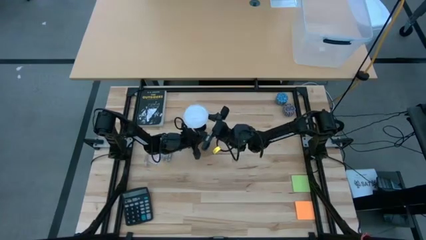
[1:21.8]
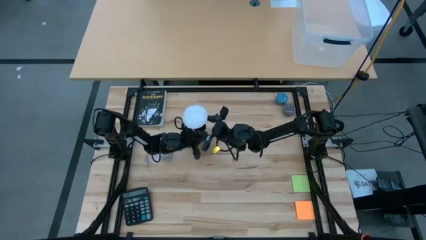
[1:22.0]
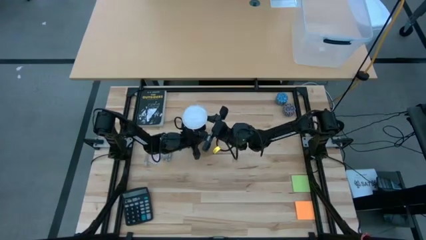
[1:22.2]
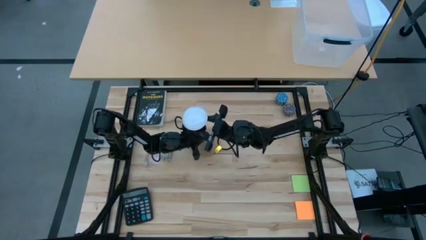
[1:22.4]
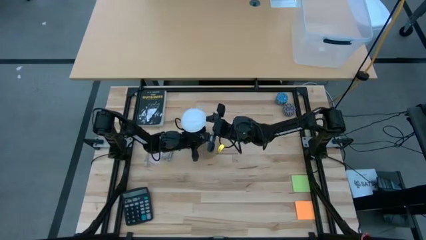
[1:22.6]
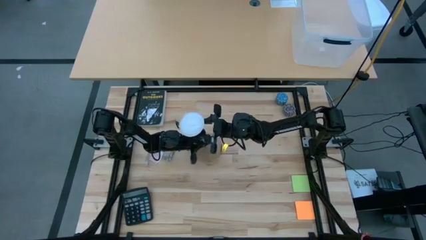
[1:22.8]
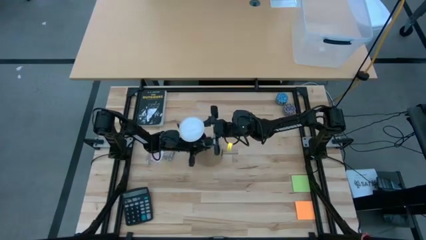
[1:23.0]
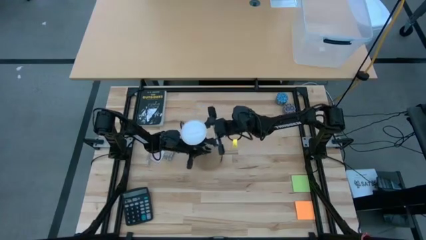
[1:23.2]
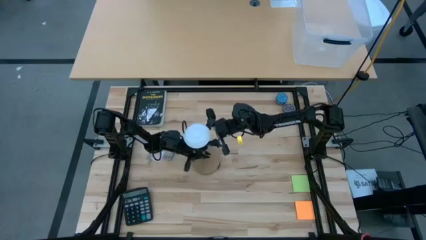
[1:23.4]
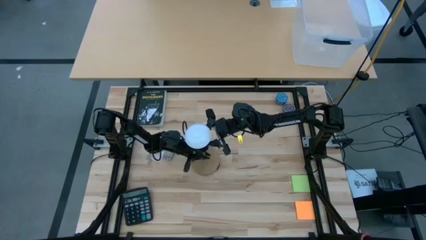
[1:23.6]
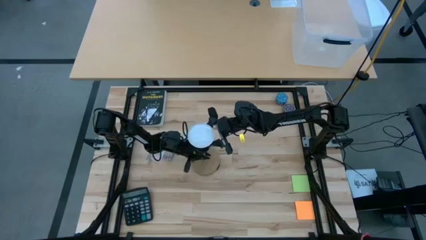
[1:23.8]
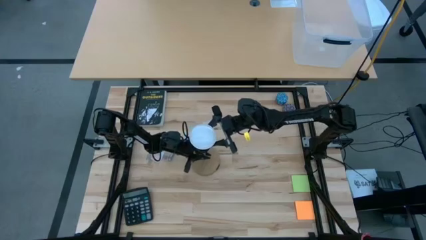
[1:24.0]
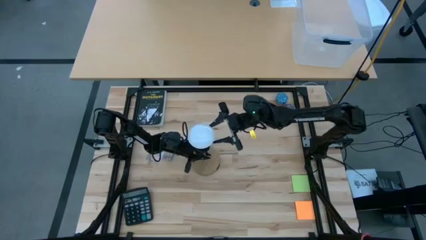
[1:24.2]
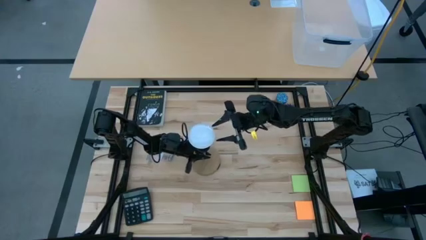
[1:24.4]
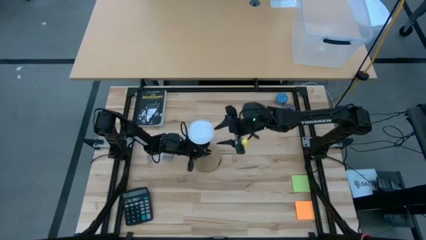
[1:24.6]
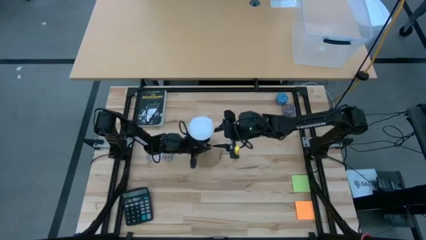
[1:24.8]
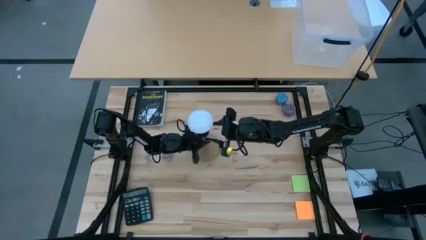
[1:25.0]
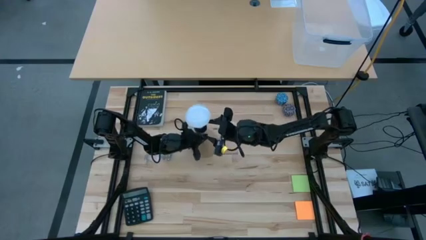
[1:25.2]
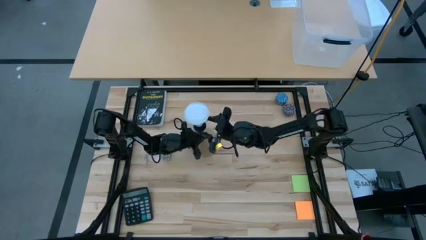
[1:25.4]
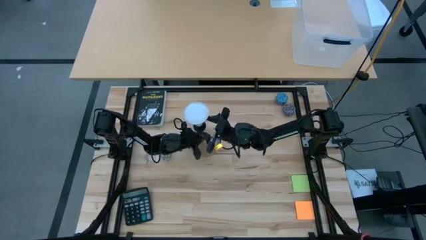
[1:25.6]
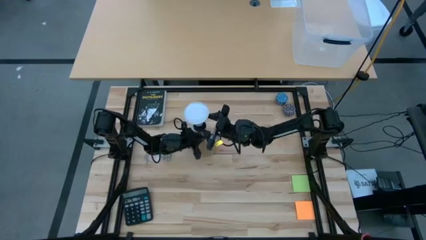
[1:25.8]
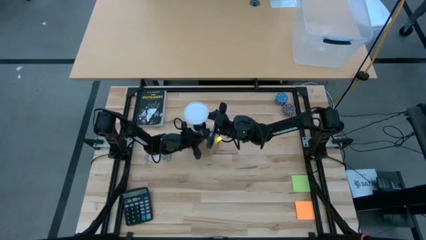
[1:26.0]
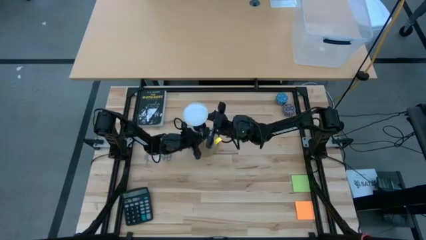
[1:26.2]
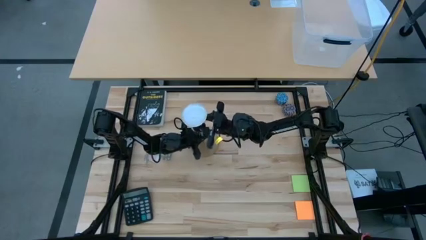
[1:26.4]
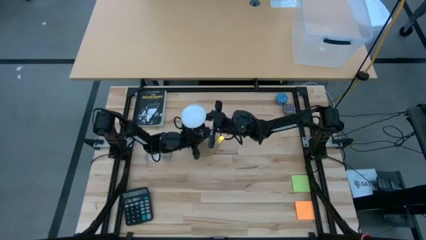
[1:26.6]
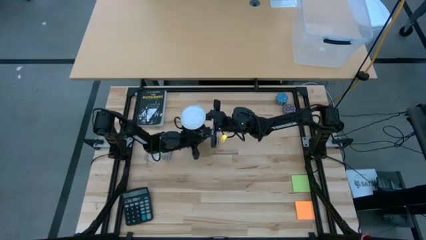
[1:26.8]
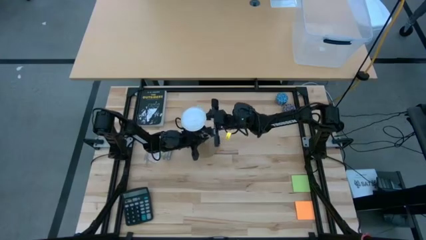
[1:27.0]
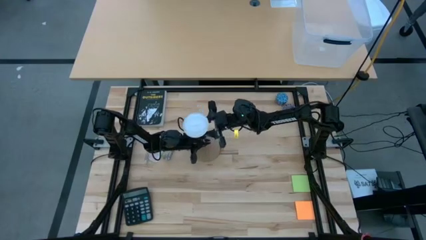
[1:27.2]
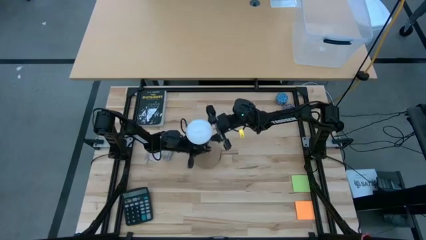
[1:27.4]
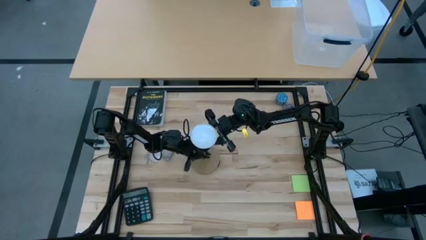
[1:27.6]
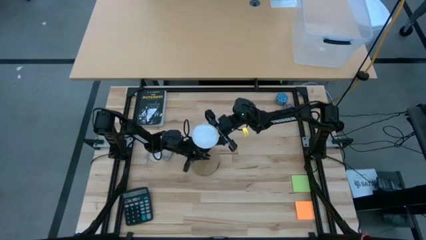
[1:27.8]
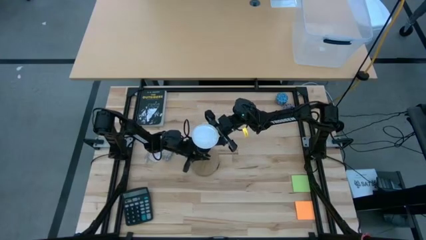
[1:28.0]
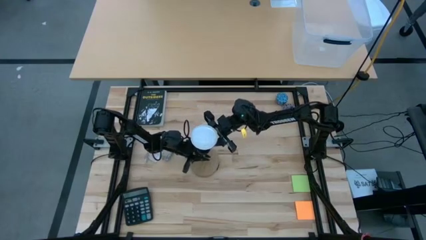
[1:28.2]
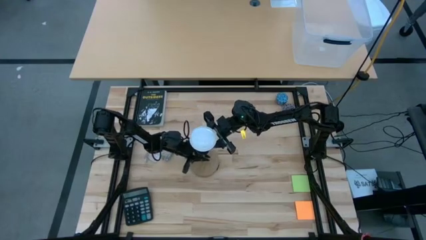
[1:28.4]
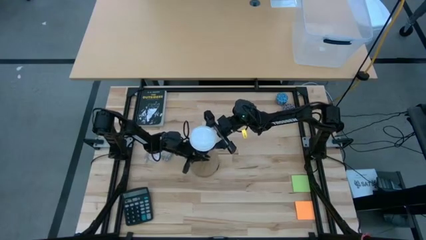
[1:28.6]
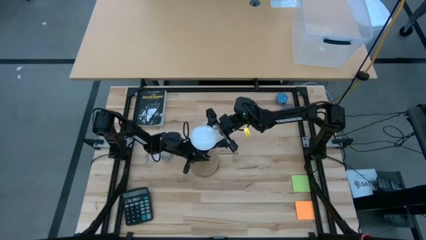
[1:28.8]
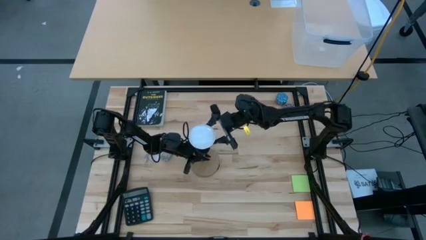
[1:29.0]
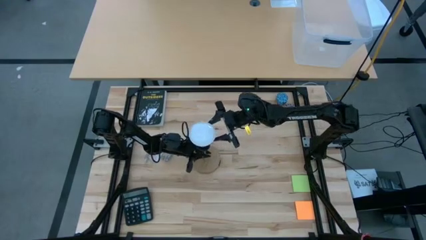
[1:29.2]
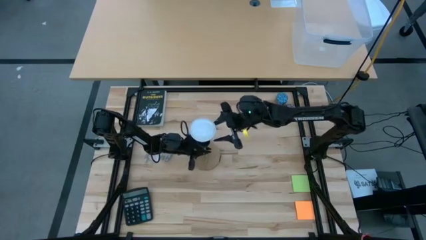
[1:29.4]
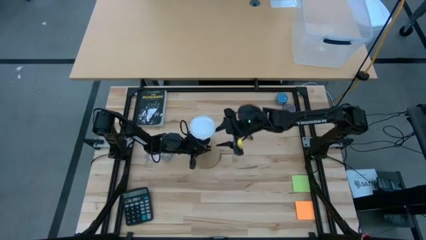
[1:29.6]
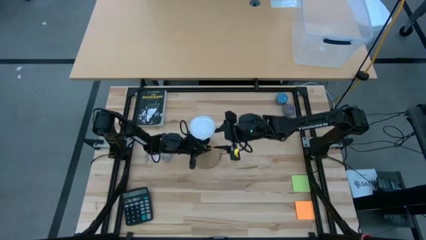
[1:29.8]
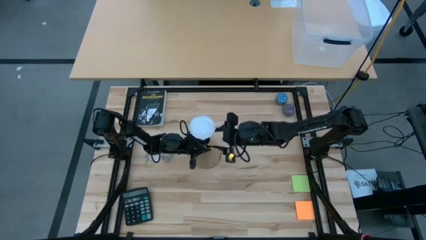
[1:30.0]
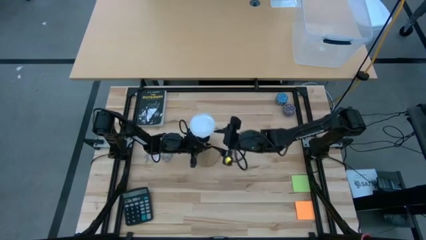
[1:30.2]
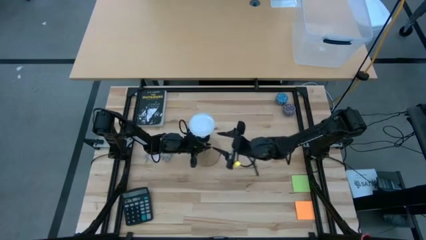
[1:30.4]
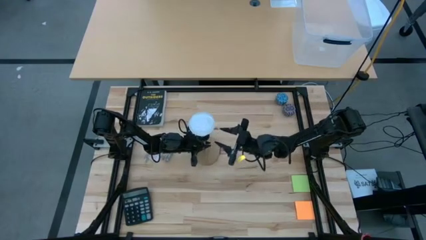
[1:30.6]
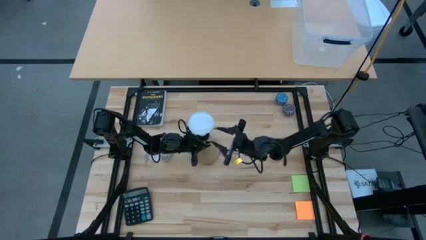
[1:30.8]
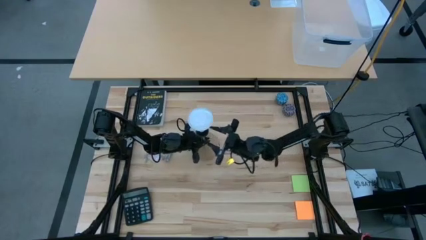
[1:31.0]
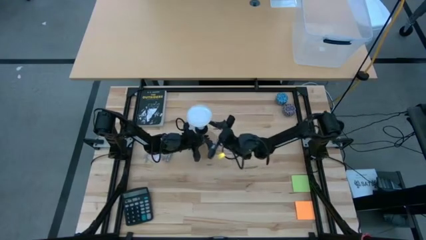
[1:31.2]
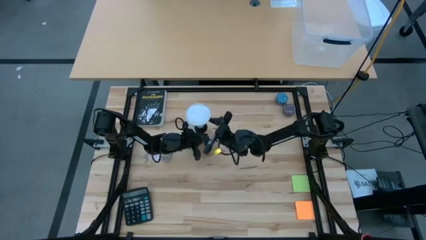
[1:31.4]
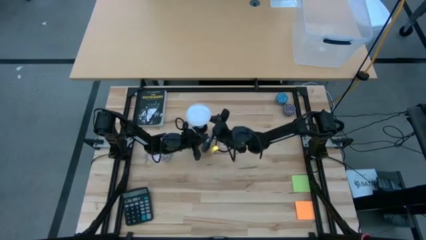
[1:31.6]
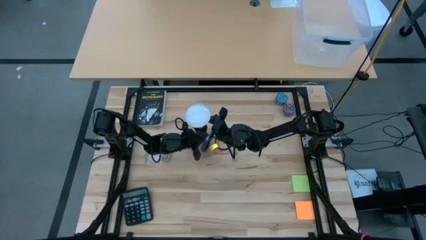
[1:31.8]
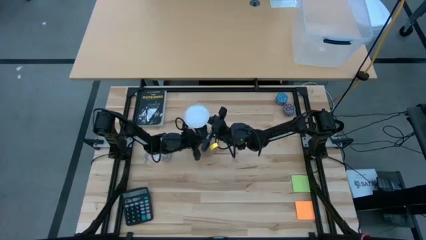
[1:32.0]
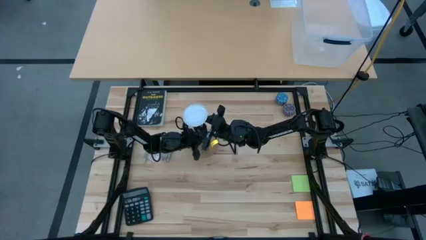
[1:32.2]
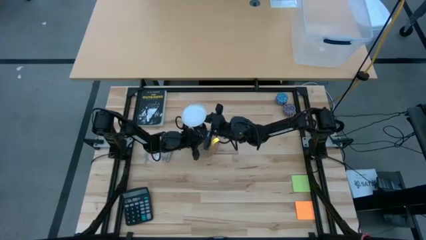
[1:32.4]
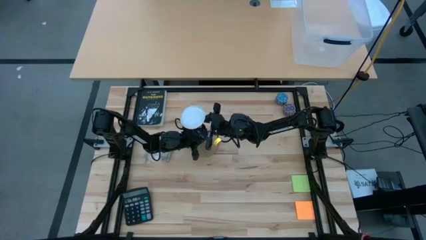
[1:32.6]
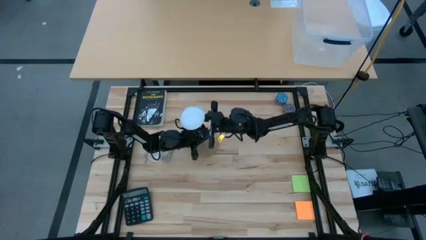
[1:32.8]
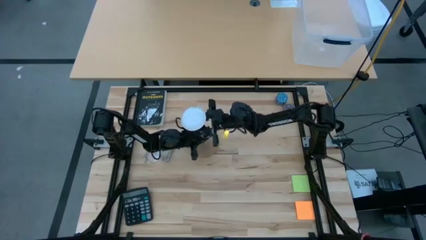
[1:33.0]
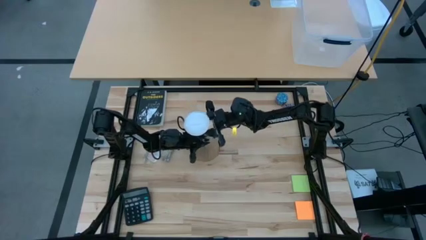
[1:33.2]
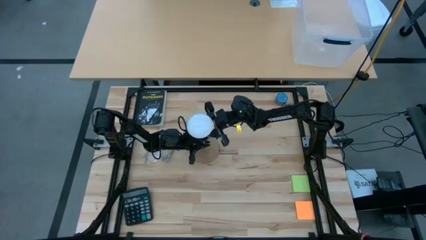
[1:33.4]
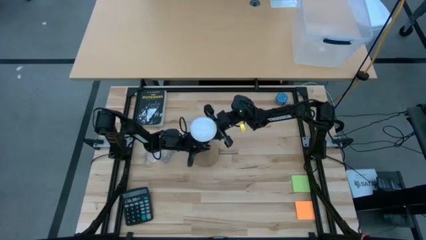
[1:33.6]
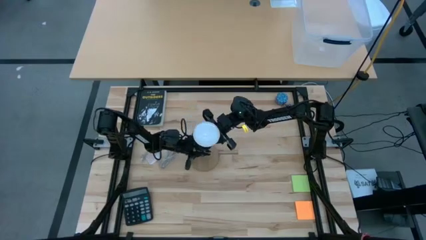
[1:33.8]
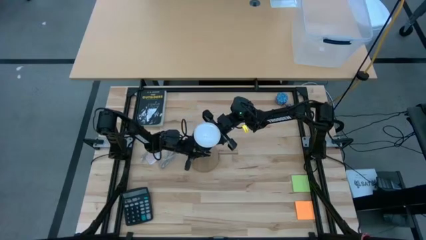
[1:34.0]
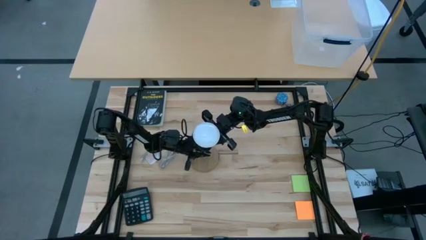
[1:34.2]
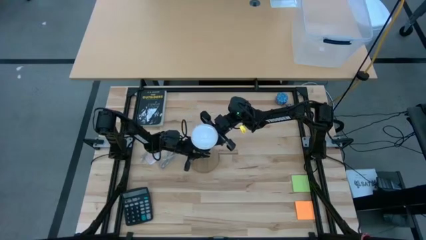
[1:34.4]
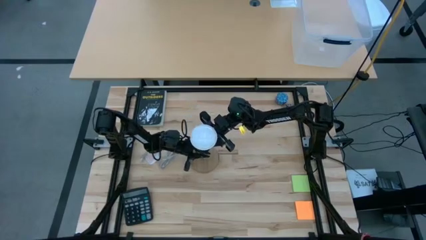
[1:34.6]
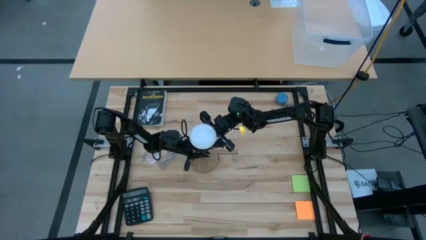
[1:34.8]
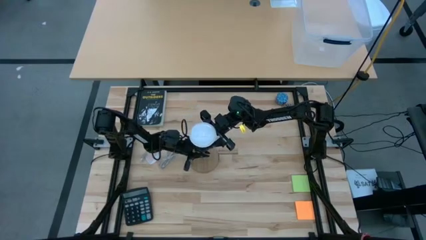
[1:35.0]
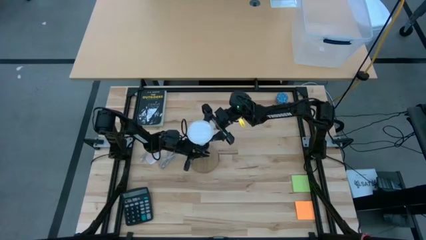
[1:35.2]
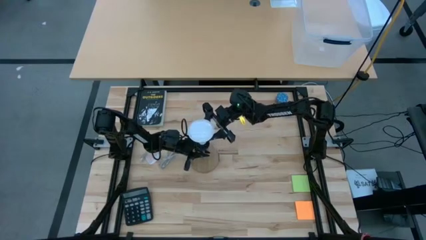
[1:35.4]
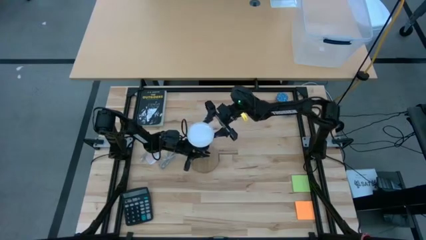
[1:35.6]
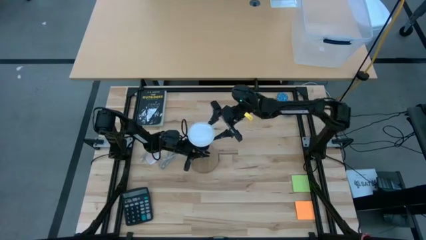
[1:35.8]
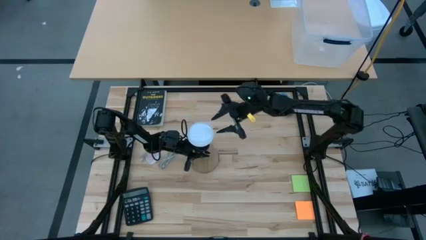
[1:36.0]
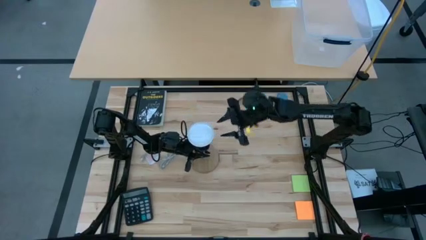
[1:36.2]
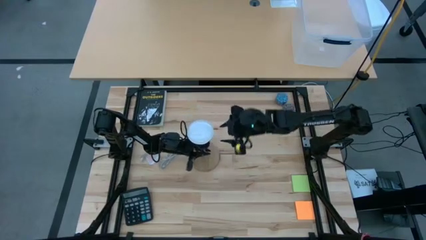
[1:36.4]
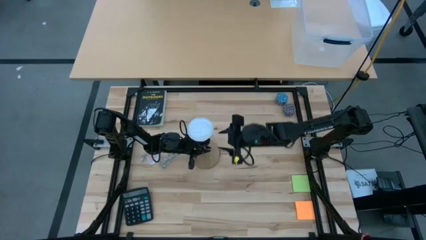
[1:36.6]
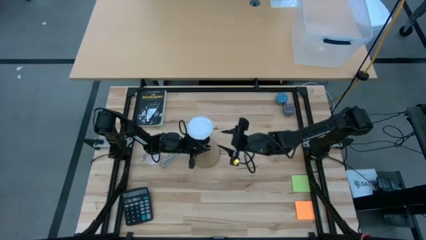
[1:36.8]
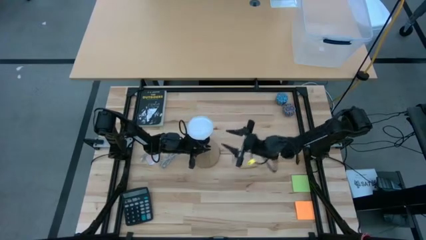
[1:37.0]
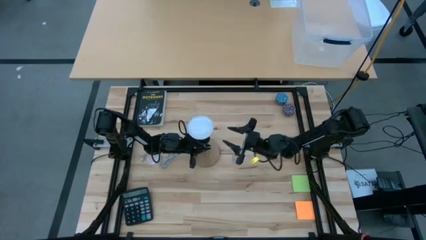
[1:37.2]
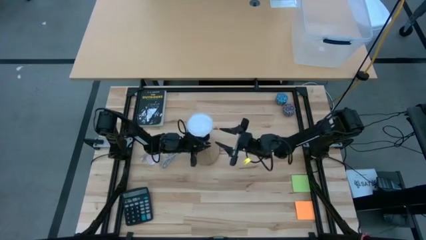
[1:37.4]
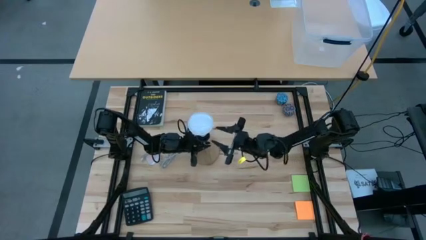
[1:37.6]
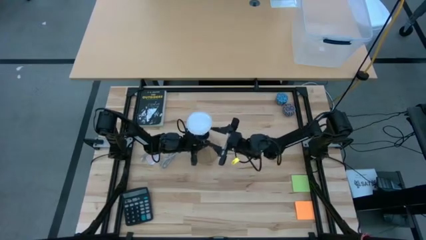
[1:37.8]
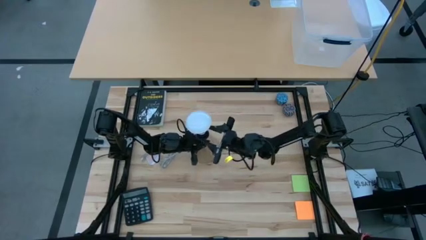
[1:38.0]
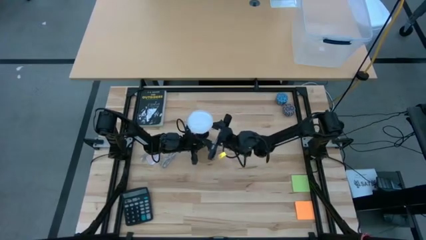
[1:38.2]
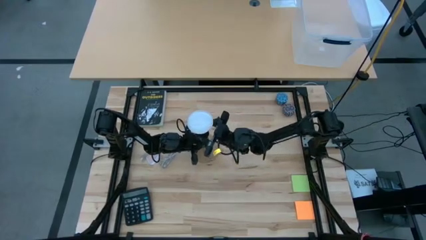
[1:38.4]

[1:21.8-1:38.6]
Task: Screw lightbulb
Remove the lightbulb from the lamp socket
